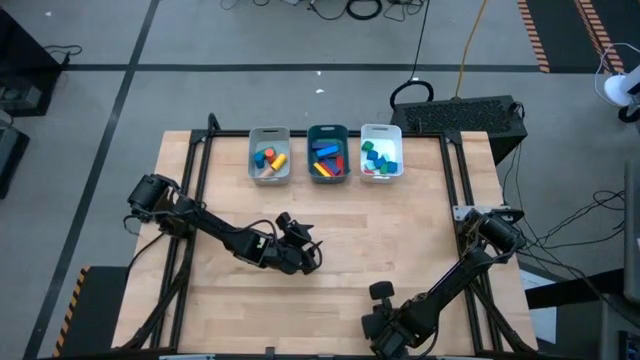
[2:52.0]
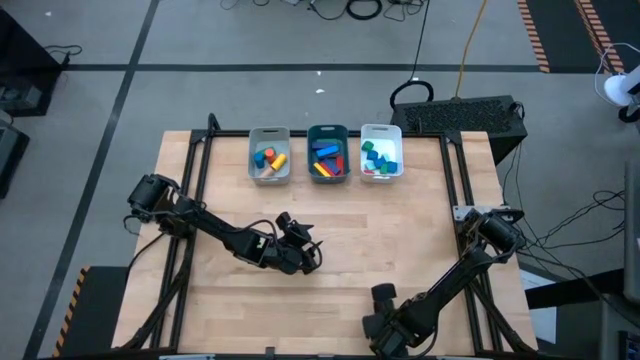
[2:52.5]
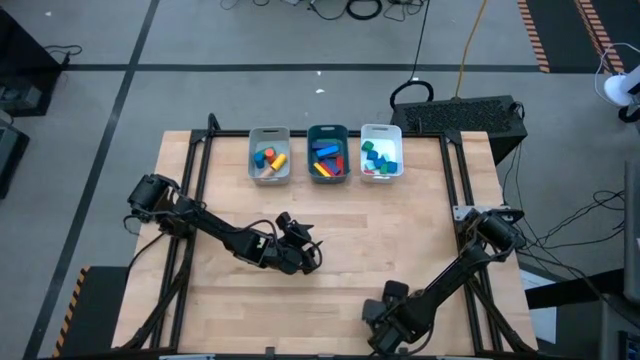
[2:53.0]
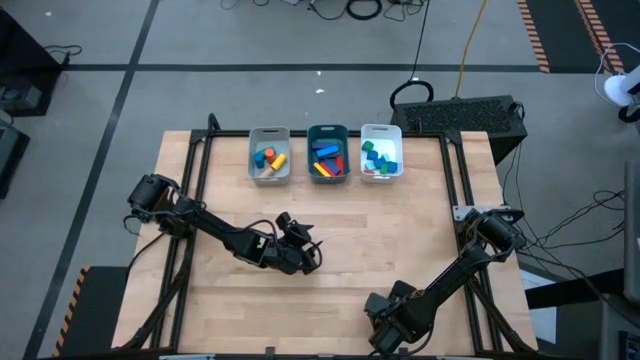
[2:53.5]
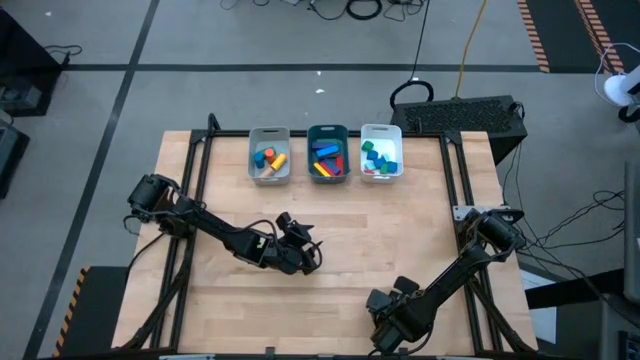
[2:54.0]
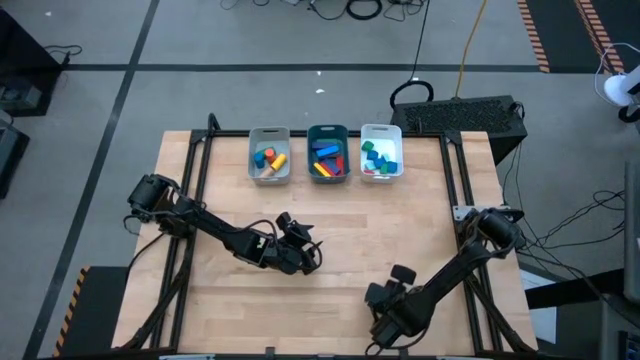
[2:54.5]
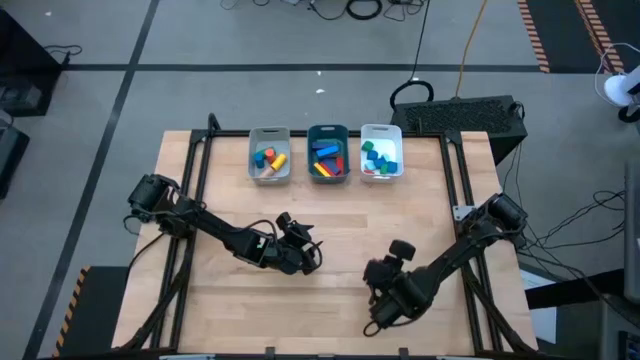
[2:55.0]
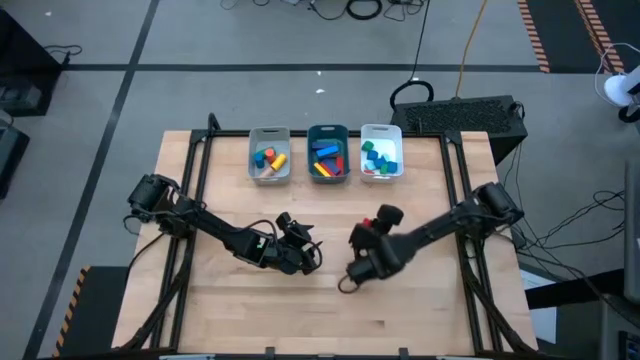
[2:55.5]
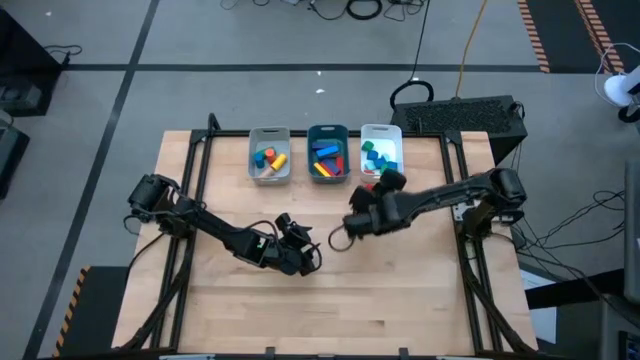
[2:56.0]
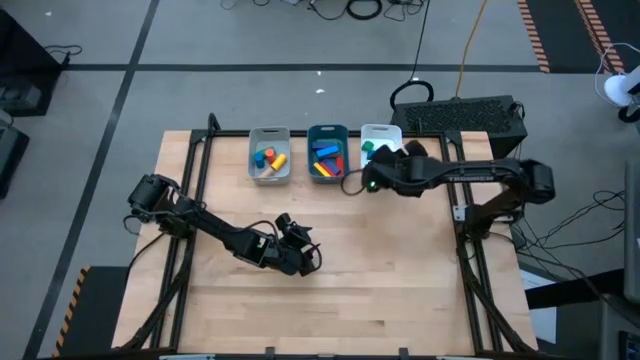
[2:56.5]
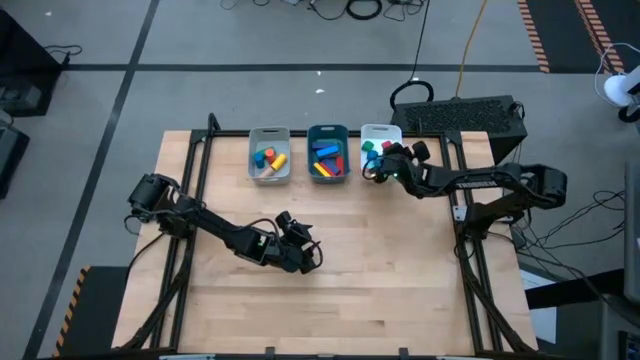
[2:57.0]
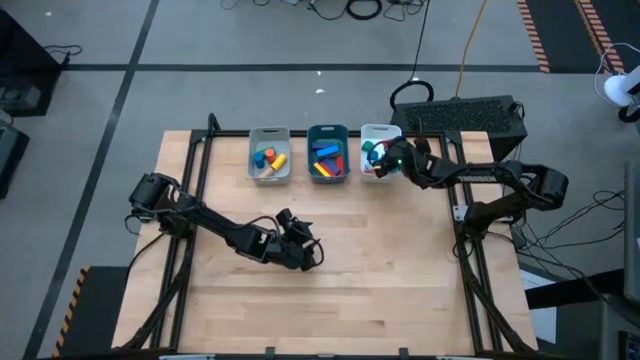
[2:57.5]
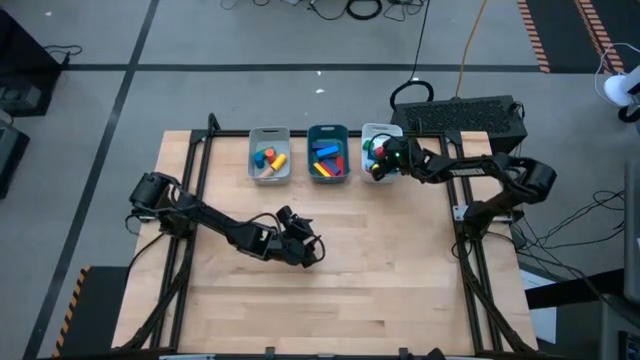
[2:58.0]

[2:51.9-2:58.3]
Task: Sort blocks by size
Put the red half-circle block into the white bin

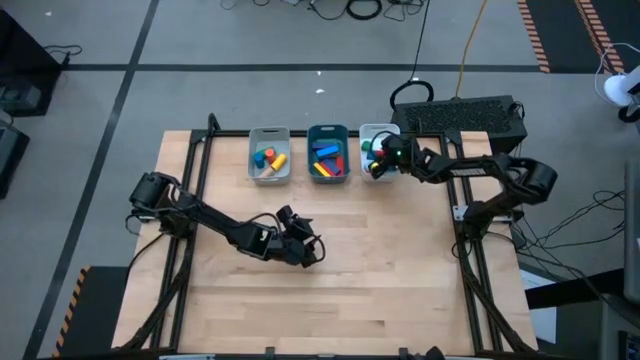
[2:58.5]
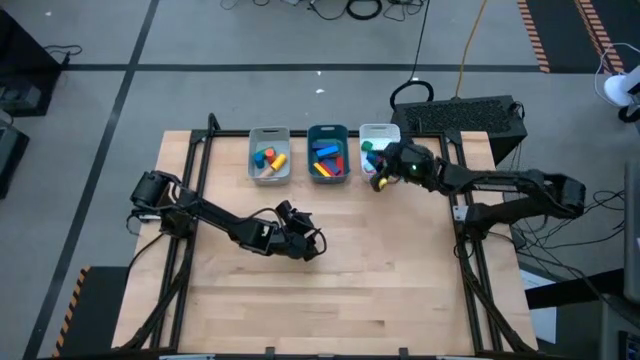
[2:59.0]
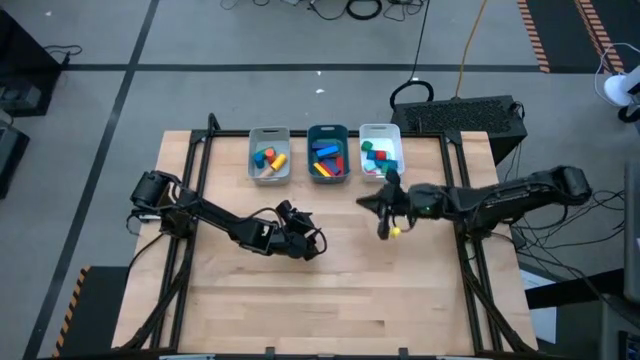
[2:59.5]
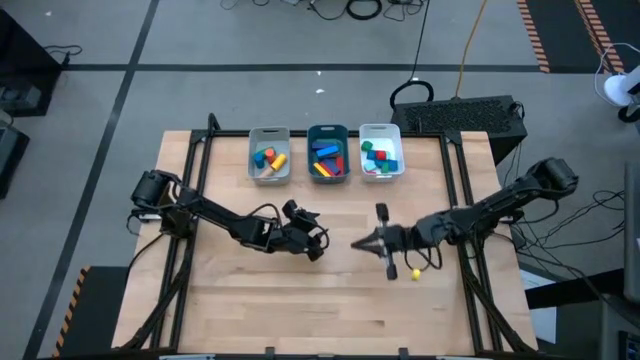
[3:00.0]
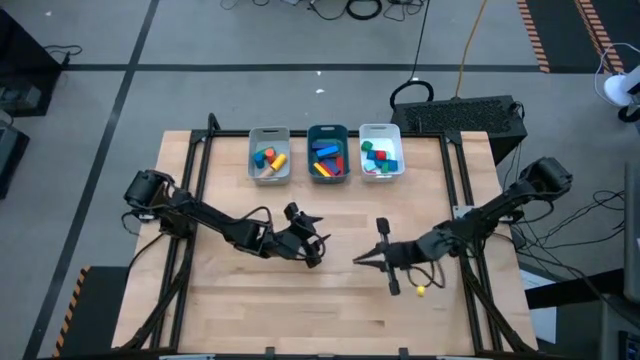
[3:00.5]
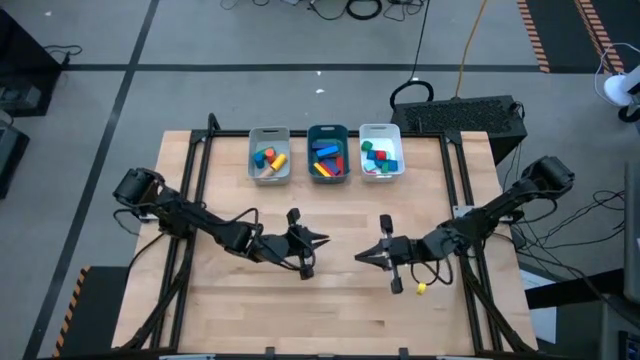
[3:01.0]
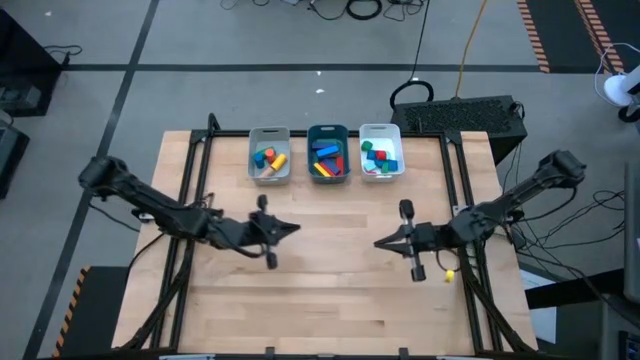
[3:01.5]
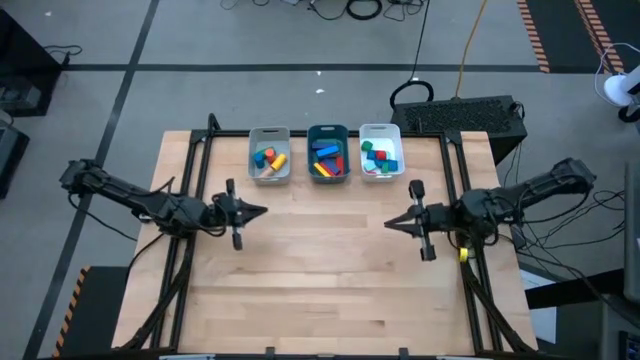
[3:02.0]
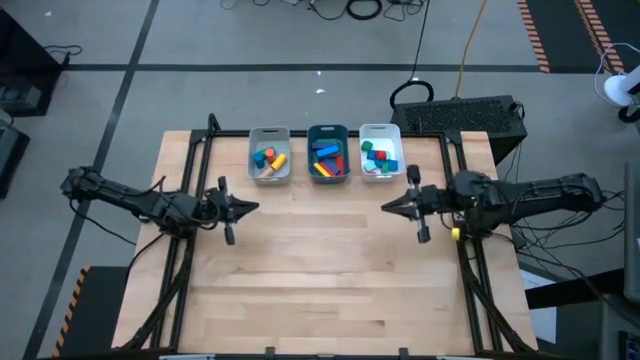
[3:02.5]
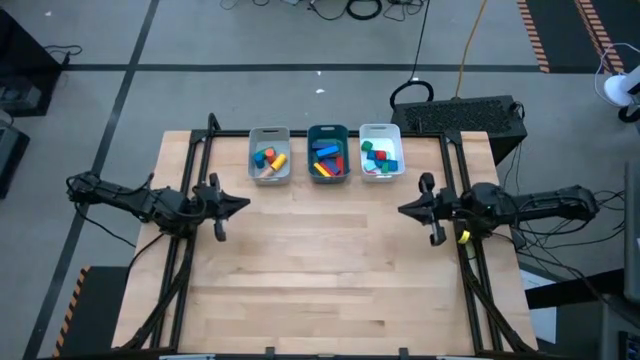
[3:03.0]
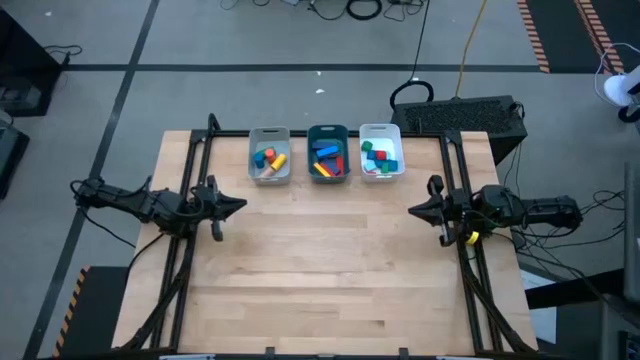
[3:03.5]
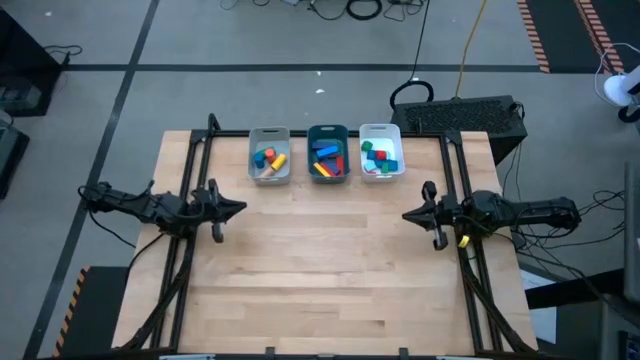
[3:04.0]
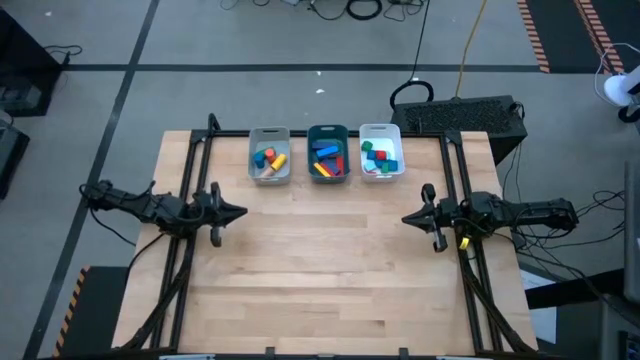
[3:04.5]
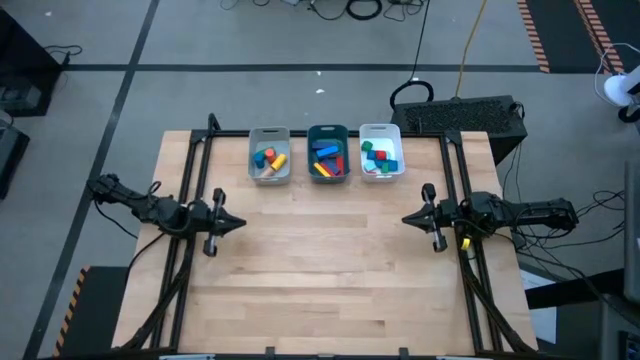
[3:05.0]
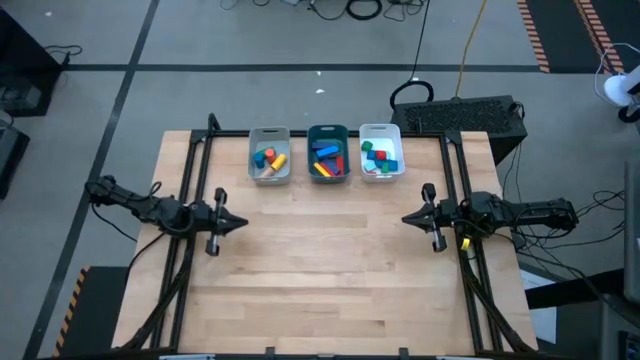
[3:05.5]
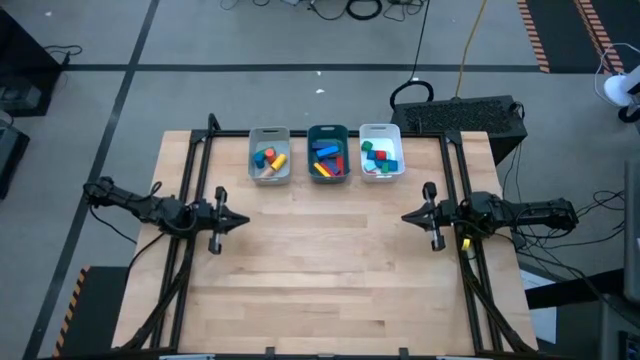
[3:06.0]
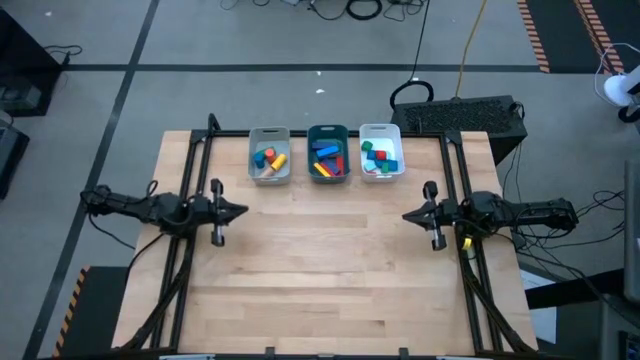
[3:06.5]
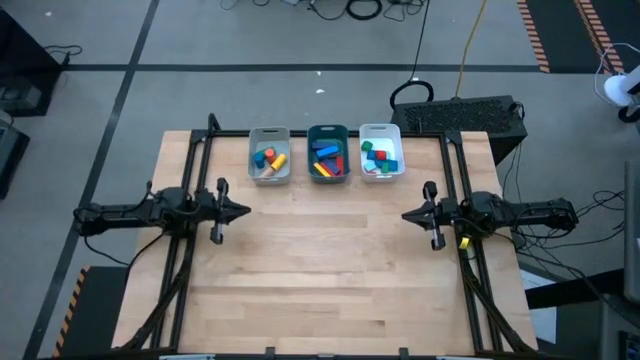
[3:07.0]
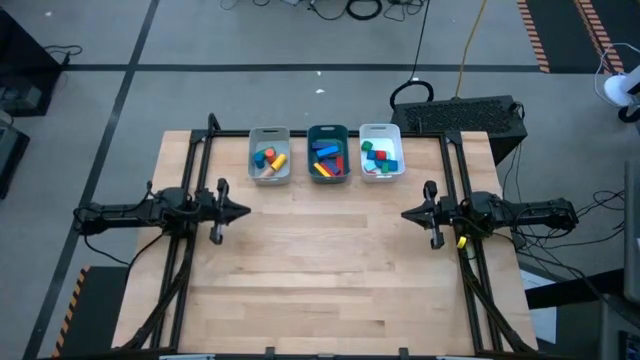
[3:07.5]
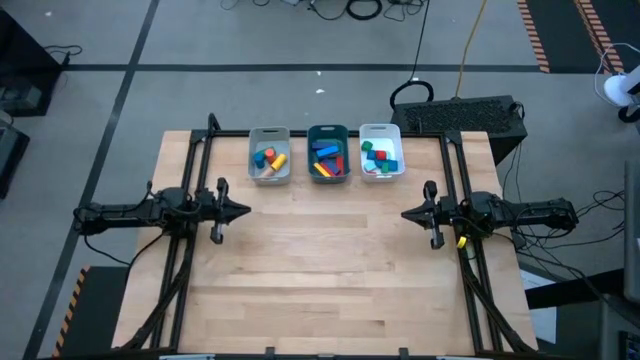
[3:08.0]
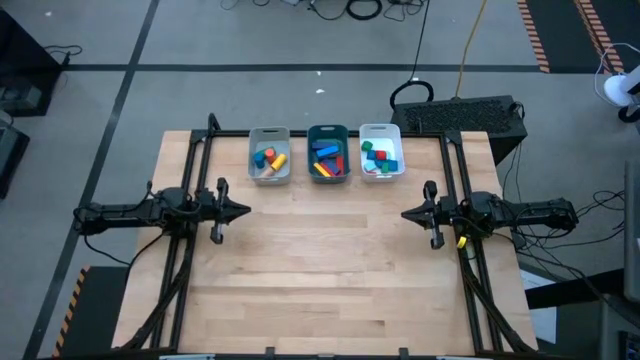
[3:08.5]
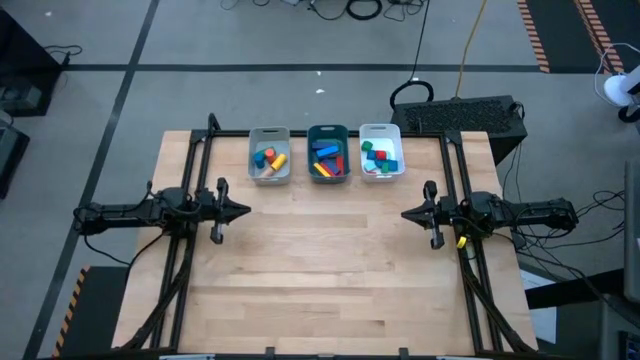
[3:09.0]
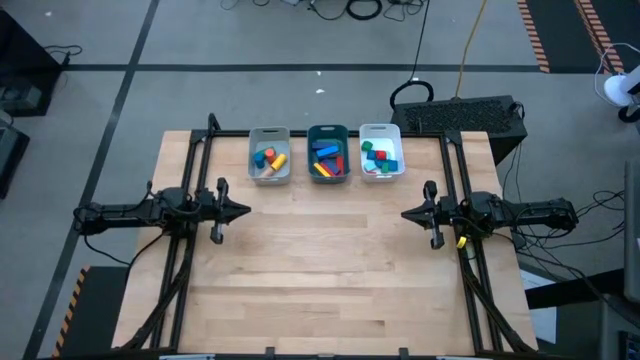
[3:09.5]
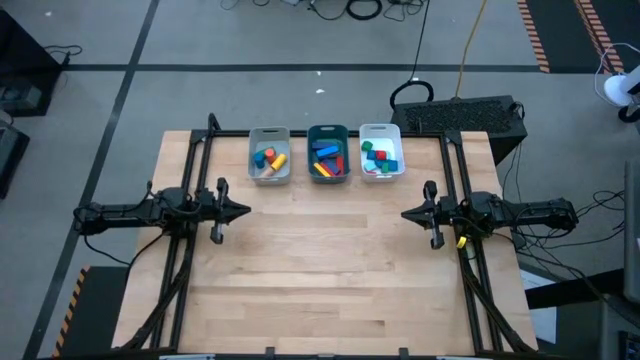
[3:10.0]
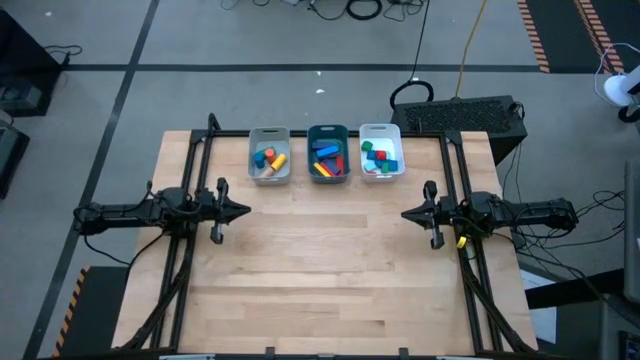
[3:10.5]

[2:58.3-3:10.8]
Return to Home Position

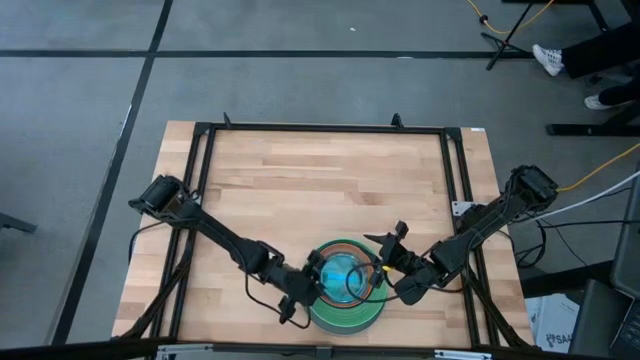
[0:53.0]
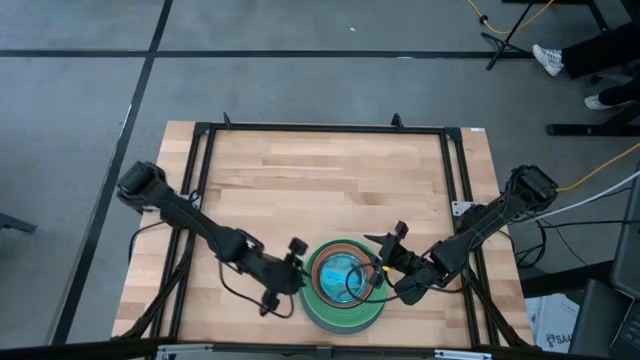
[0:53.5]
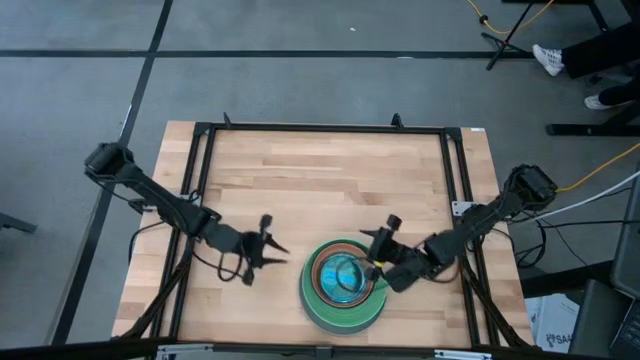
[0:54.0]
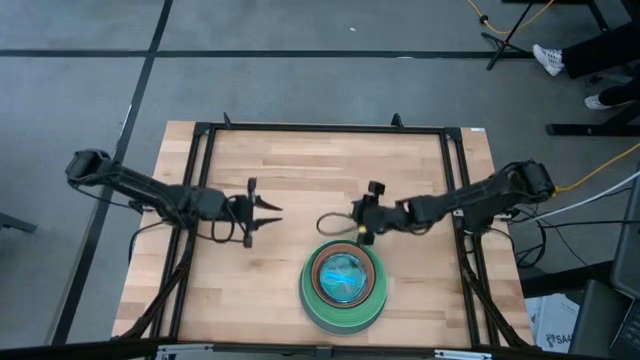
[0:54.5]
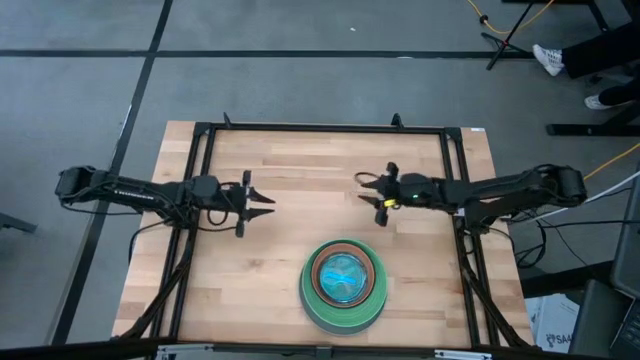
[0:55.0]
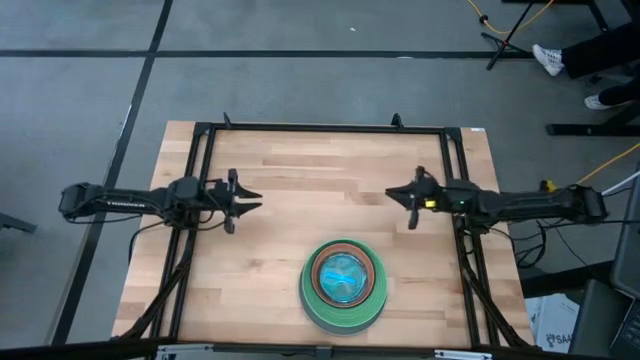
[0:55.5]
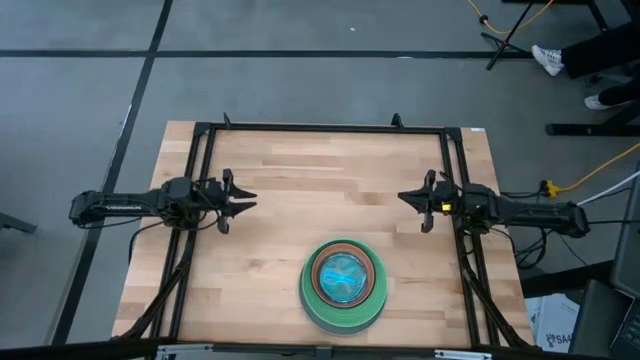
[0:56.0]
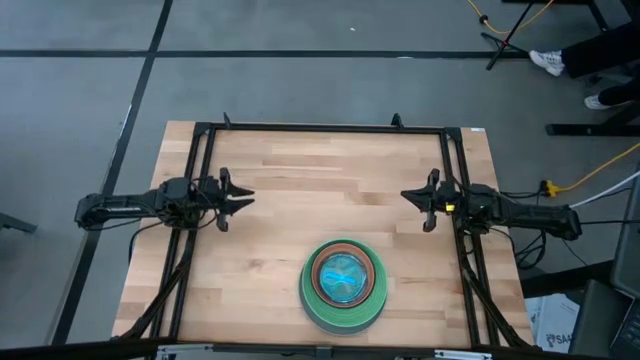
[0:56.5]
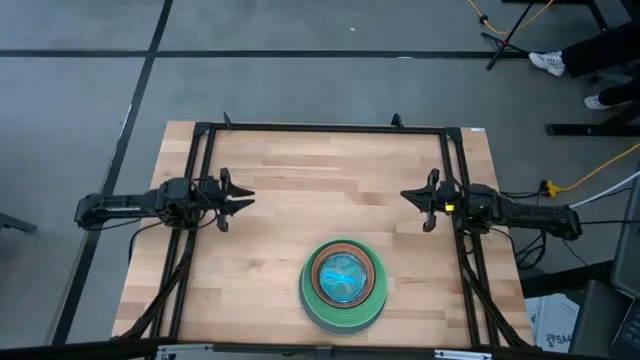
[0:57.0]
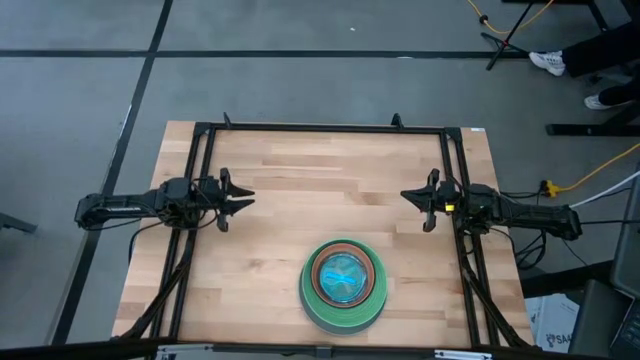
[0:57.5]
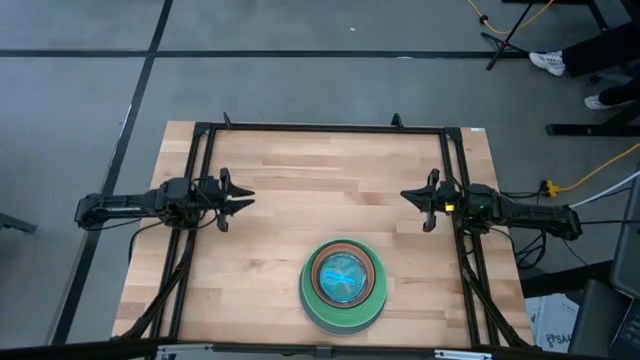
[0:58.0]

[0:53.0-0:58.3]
Task: Stack plastic plates
Return to Home Position
